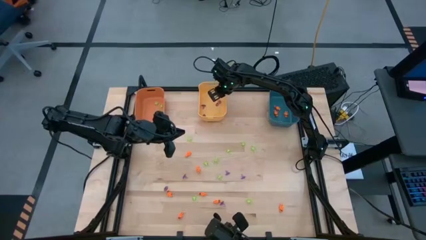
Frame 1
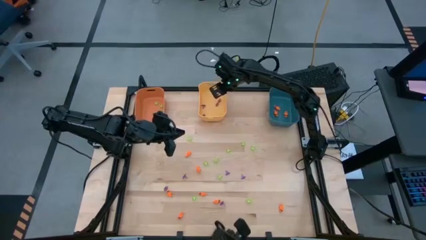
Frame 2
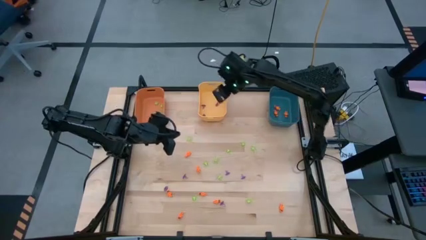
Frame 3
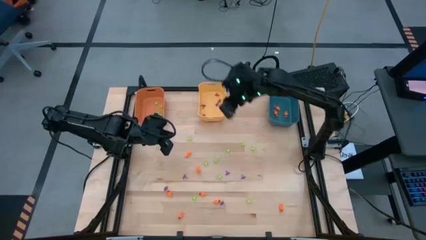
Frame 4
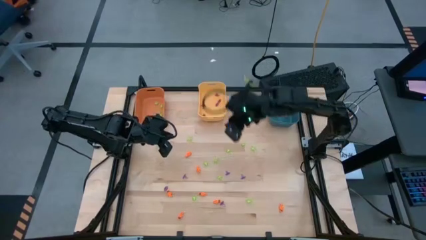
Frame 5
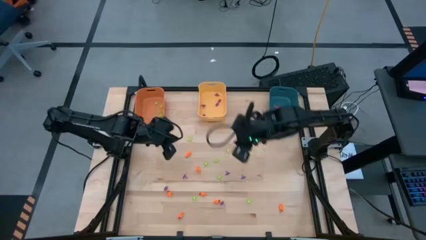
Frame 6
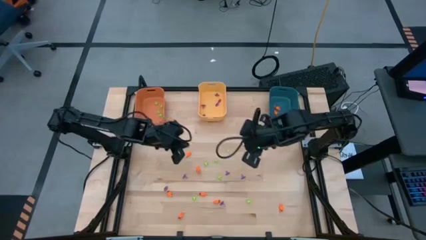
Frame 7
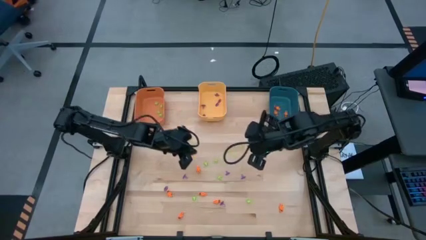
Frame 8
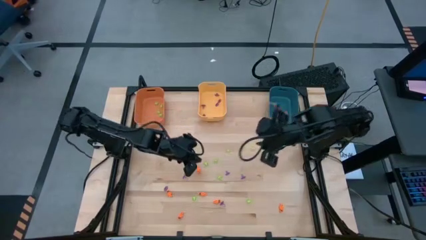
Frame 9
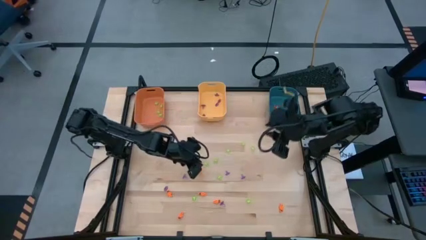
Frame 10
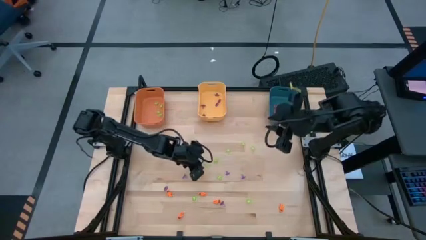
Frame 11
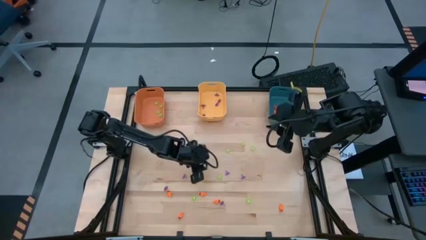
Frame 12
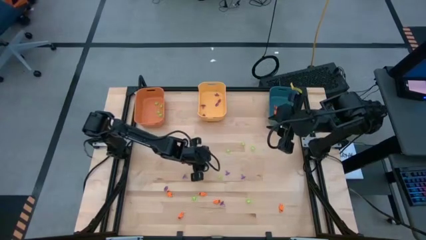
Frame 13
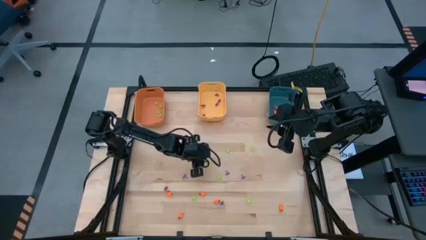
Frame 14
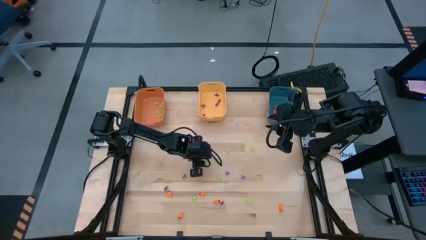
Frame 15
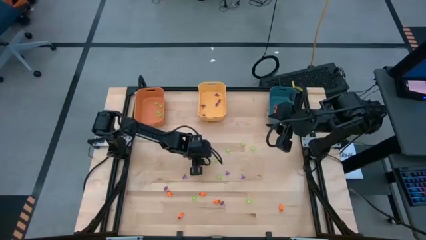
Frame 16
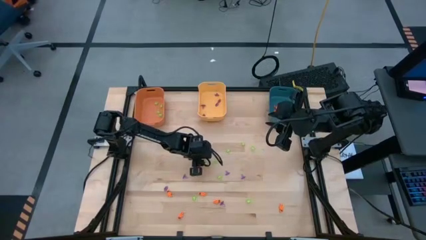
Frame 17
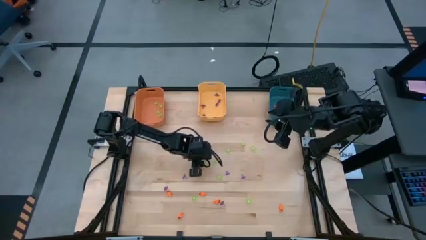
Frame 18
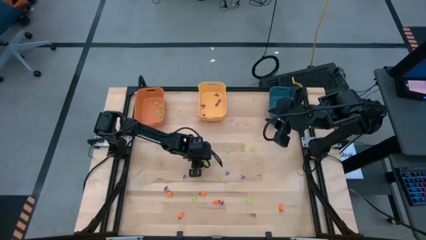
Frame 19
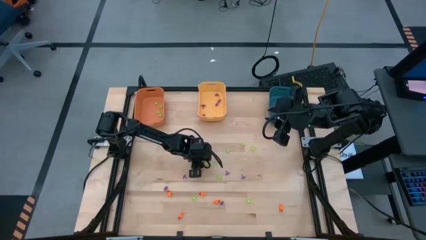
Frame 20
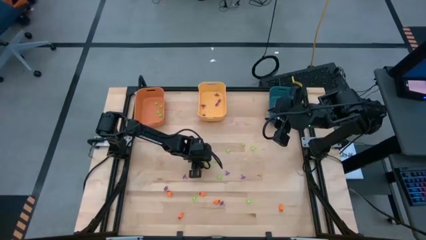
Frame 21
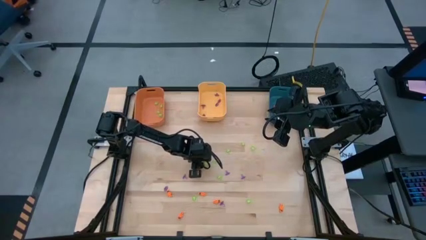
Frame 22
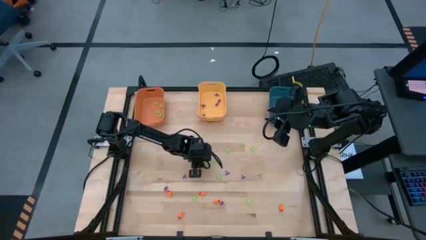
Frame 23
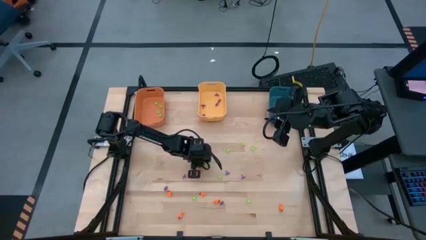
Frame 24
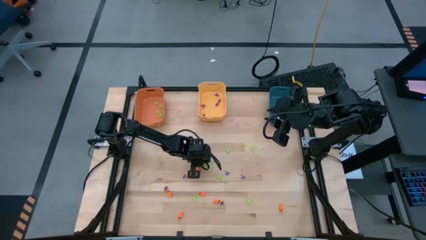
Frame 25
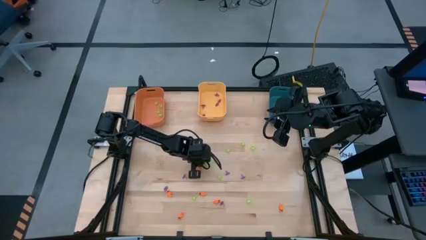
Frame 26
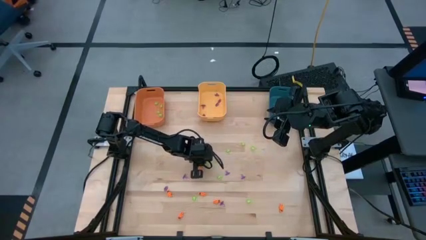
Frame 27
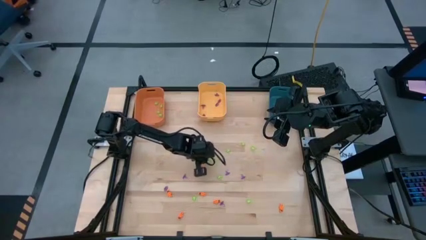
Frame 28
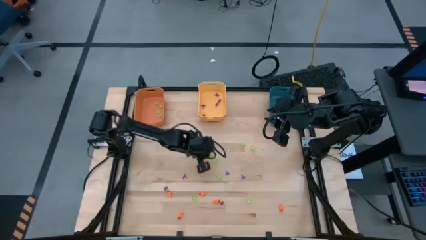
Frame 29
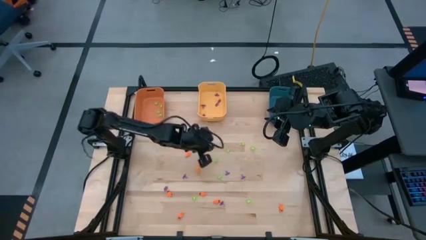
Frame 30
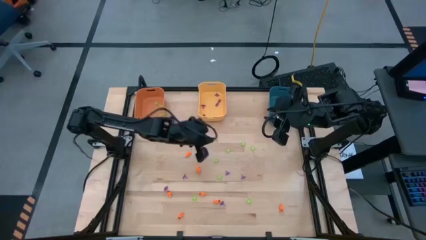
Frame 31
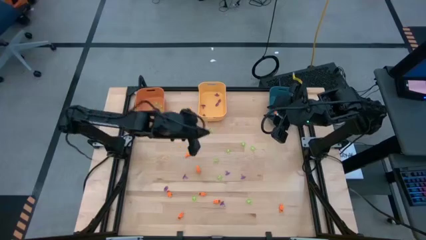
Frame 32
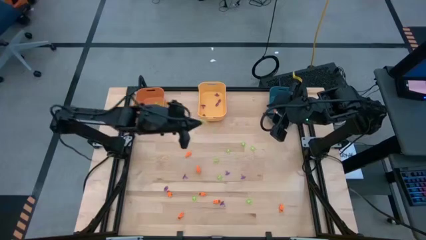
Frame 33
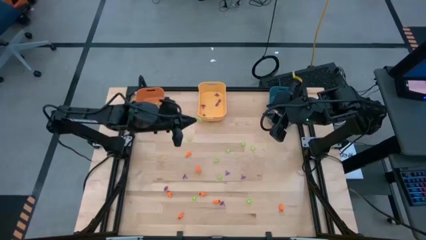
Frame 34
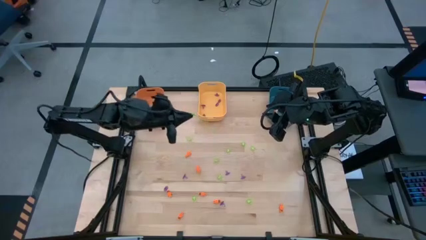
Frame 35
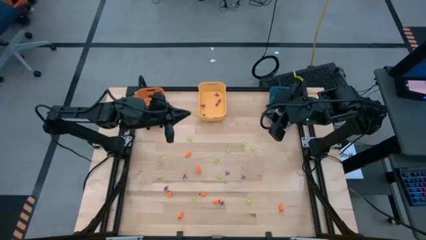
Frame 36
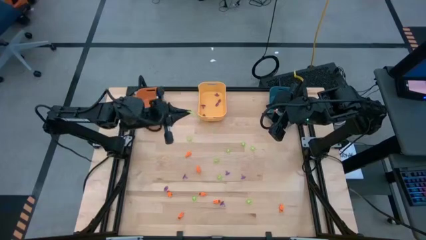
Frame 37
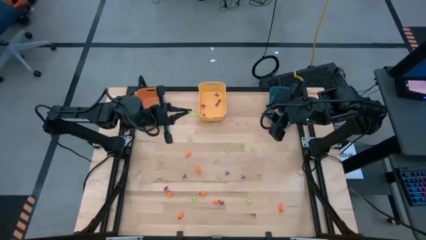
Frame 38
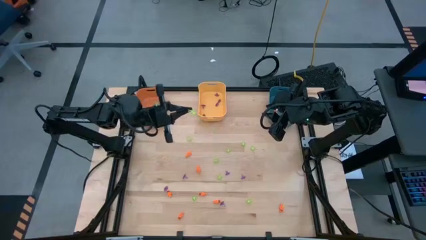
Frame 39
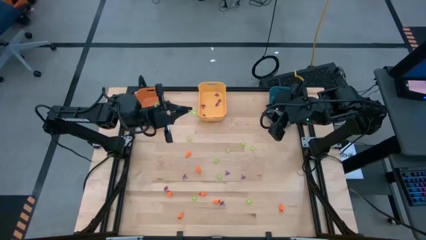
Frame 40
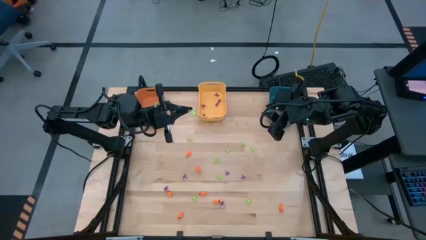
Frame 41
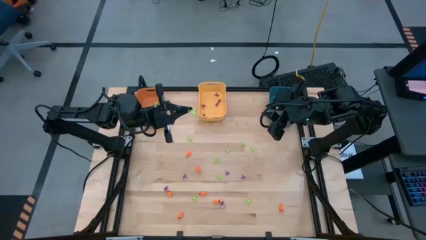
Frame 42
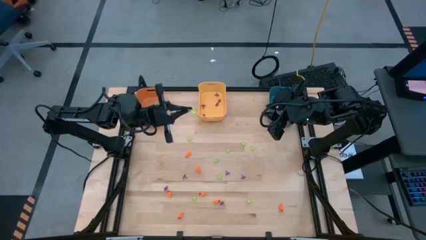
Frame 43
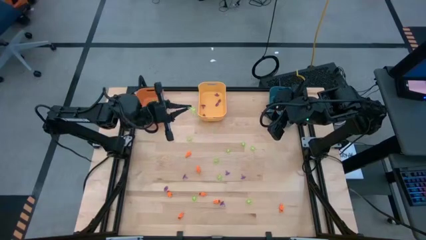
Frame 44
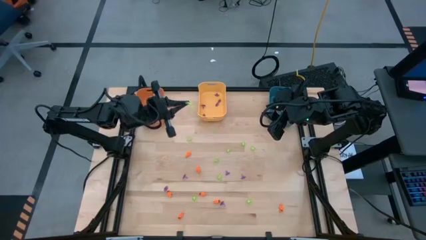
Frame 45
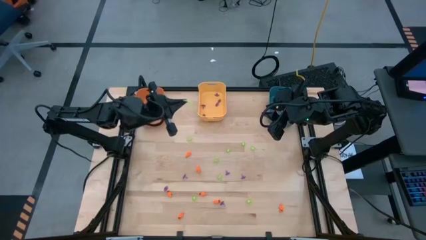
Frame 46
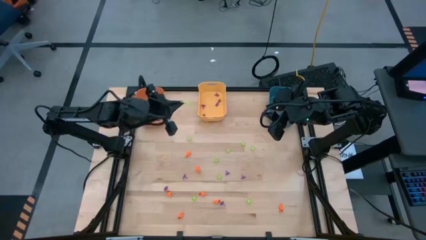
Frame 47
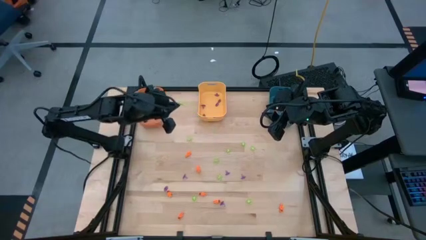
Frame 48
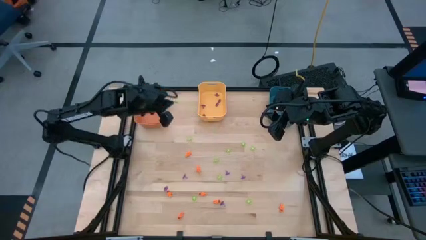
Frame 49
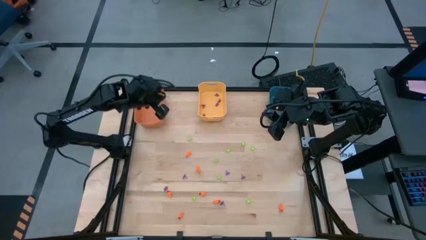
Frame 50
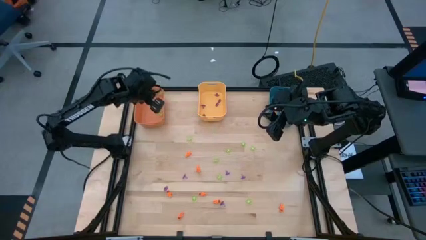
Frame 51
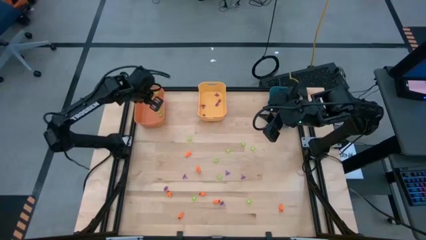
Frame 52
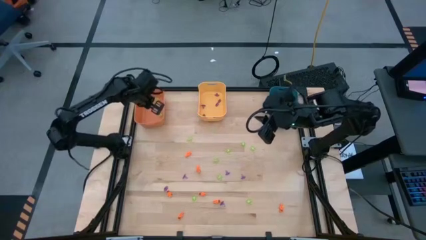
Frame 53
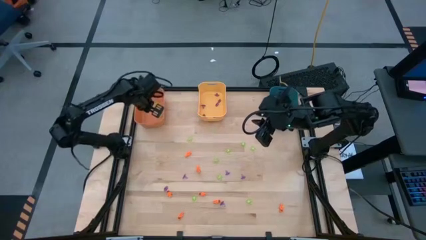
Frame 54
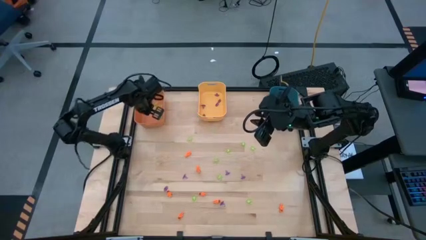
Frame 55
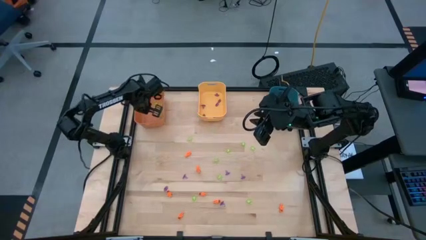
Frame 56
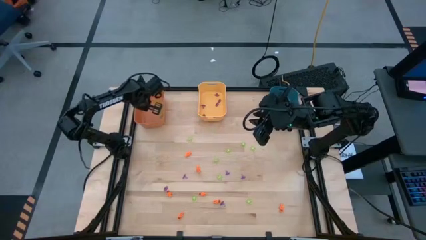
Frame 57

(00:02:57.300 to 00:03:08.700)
Task: Sort Halloween decoration
Put the green spider toy into the orange bin

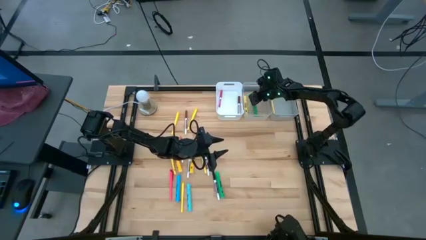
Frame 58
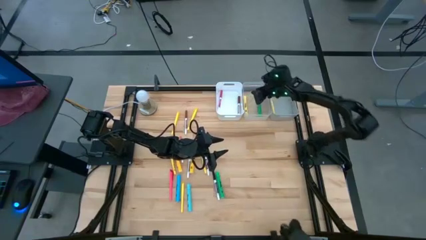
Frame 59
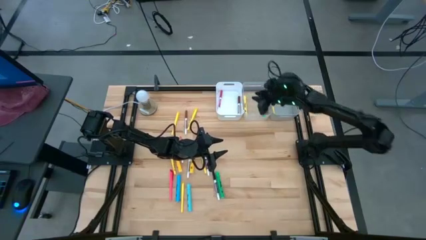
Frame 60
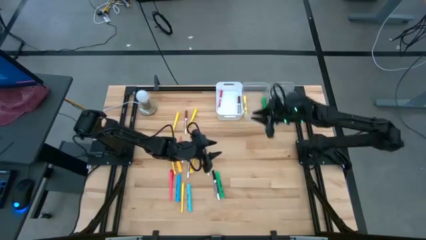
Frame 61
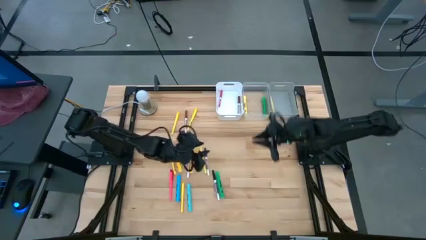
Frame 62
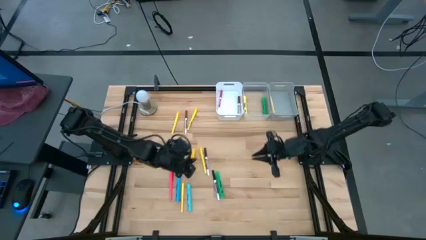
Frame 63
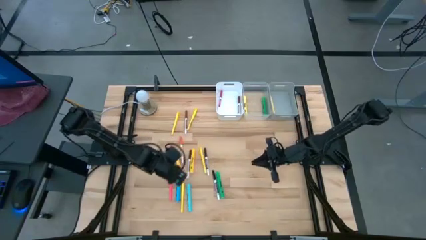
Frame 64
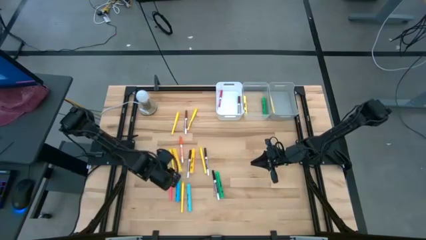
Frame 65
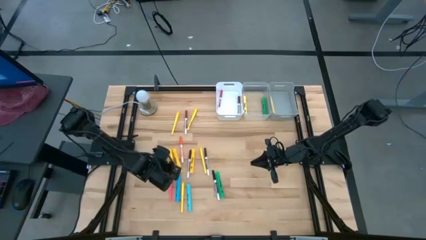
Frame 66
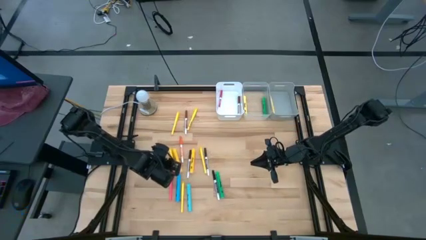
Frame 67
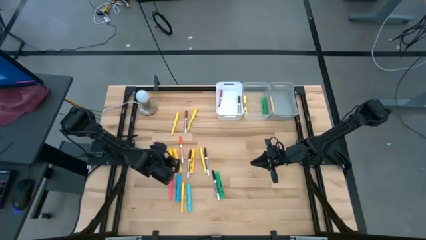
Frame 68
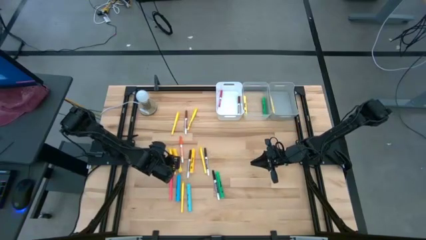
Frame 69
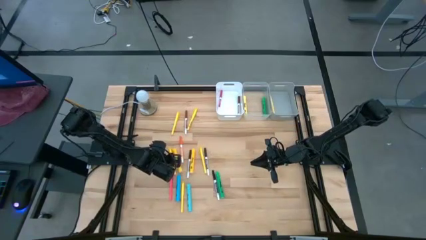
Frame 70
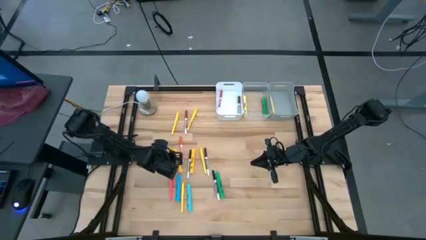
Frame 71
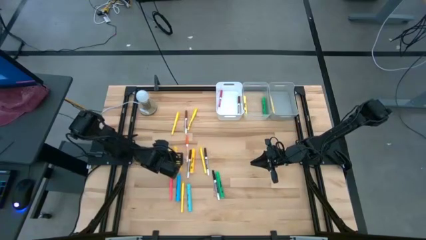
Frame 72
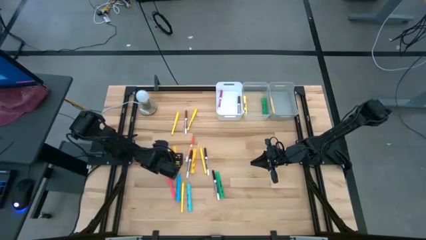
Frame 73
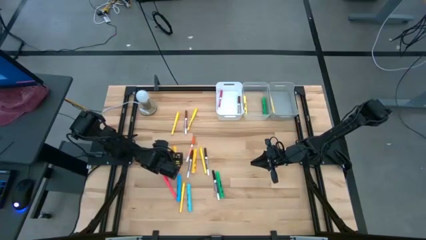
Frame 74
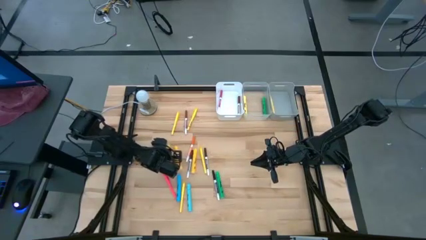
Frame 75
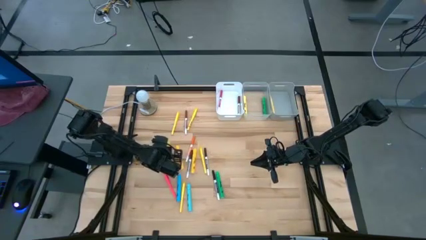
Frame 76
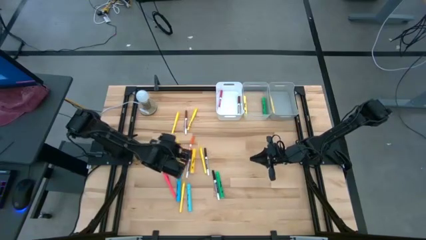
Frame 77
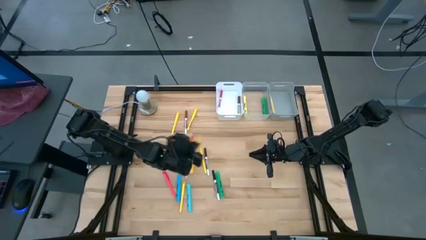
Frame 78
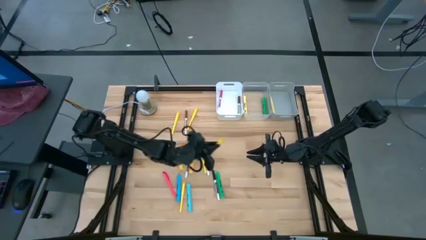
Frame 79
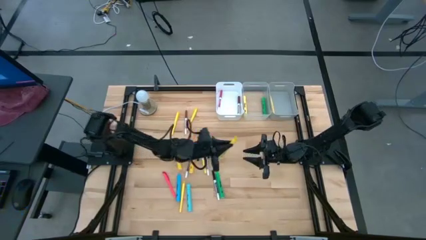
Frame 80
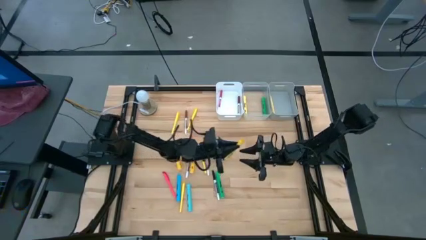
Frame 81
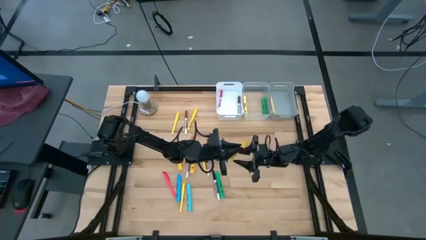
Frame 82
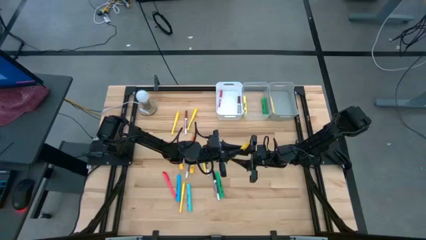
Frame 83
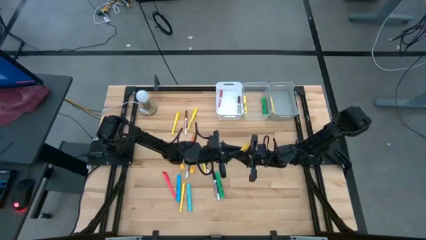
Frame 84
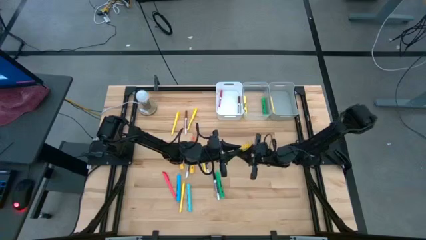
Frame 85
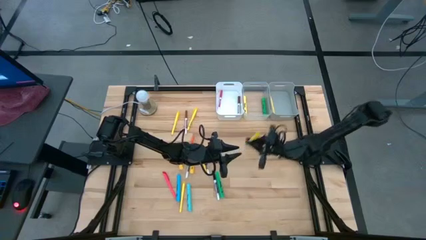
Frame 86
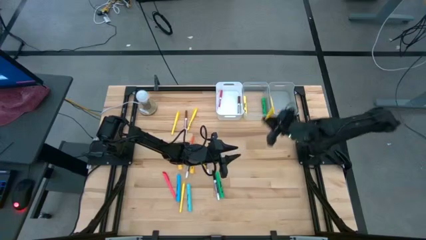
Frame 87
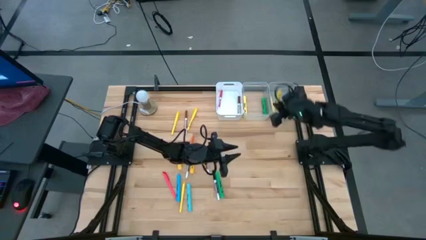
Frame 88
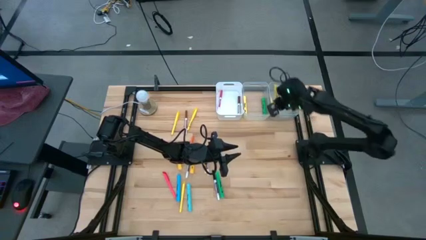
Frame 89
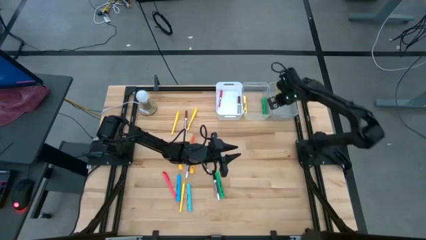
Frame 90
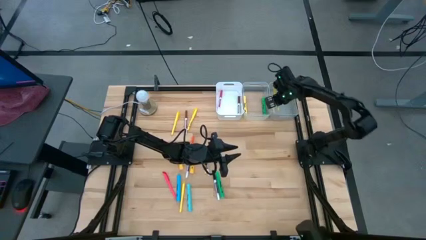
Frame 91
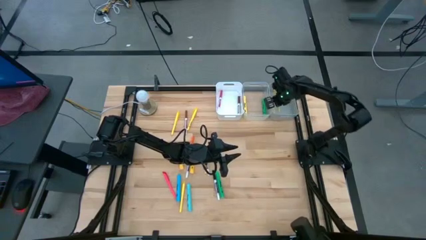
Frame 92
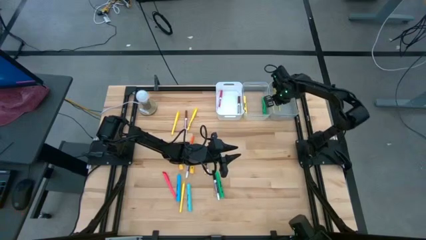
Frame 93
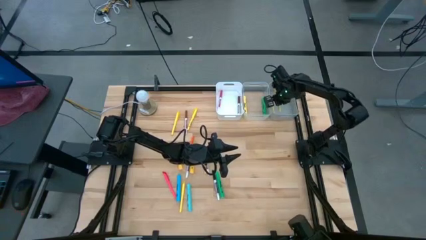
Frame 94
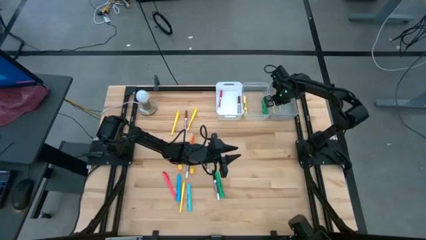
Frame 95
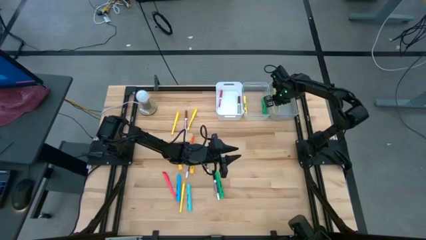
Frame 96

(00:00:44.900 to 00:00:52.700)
Task: Pick & Place Markers
Put the yellow pen into the gray bin
